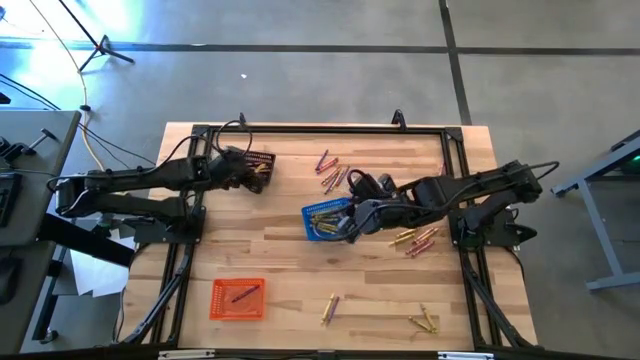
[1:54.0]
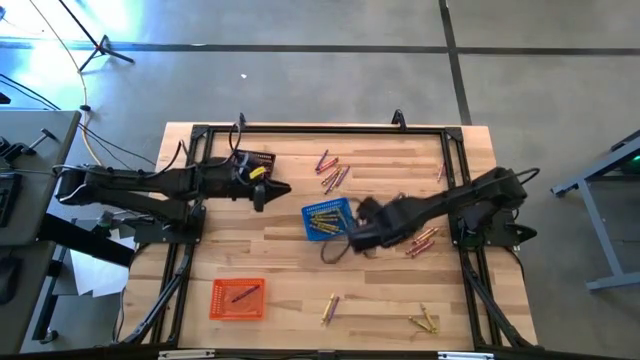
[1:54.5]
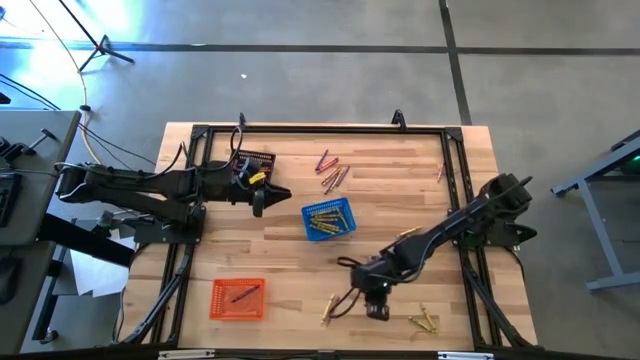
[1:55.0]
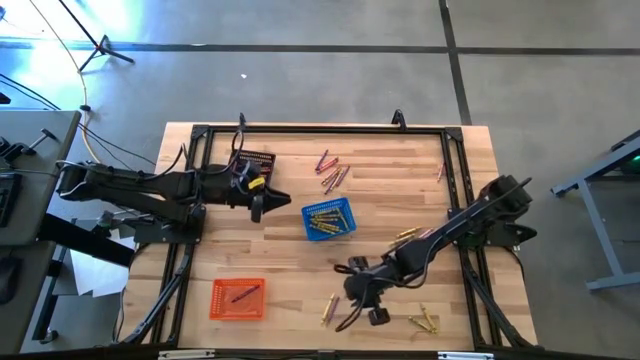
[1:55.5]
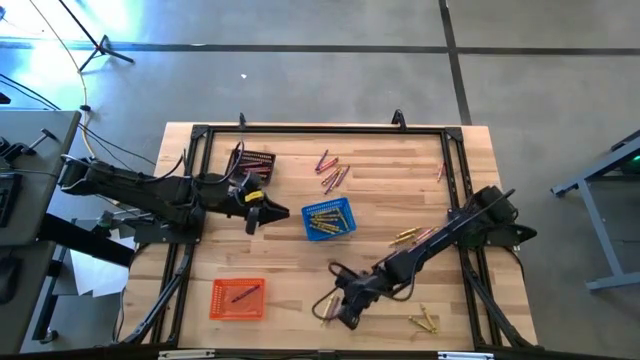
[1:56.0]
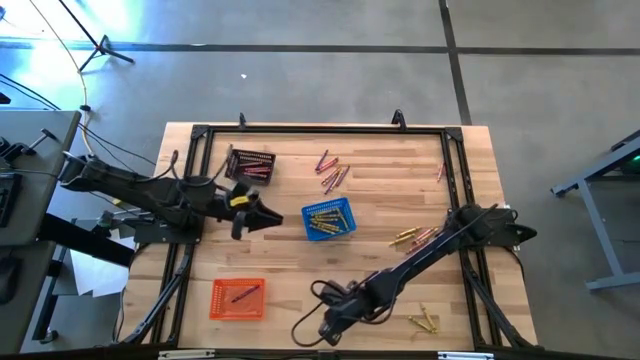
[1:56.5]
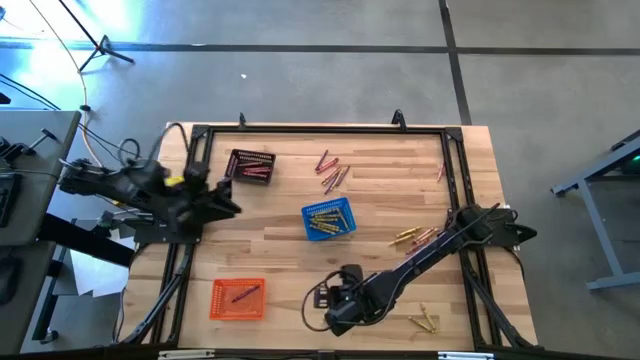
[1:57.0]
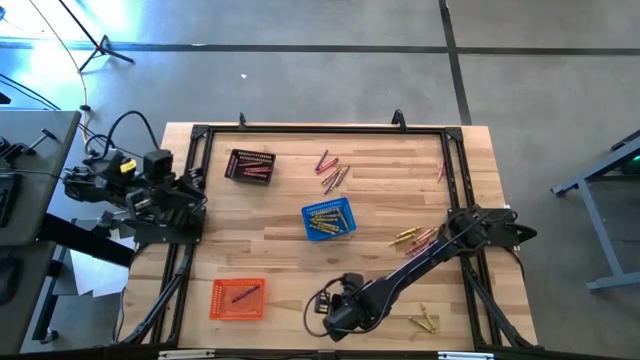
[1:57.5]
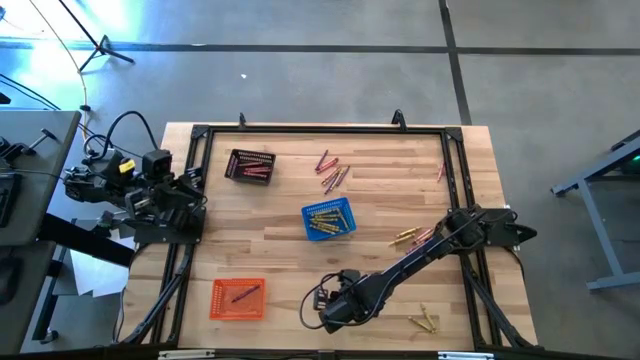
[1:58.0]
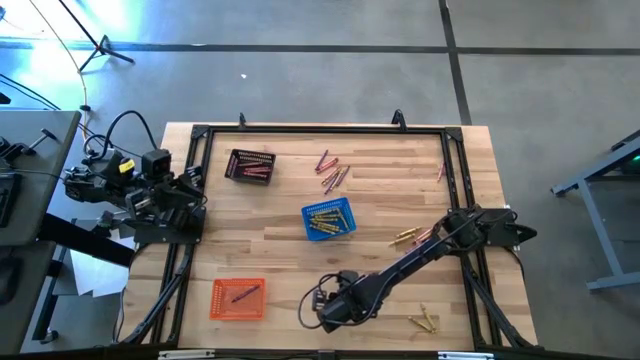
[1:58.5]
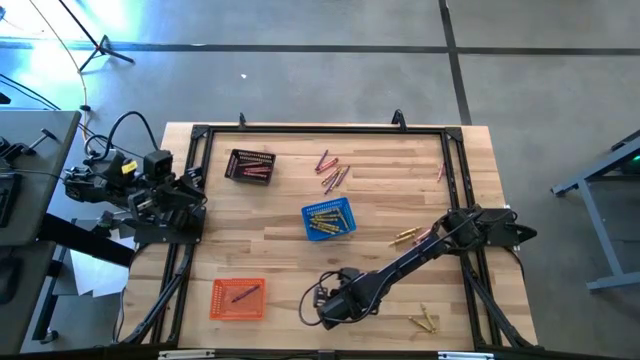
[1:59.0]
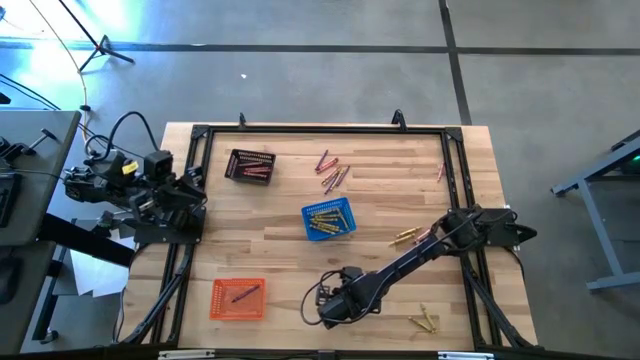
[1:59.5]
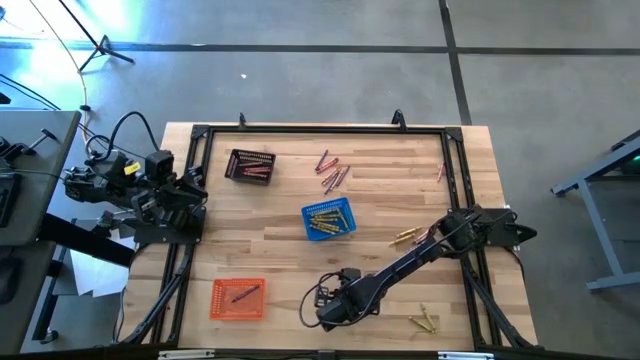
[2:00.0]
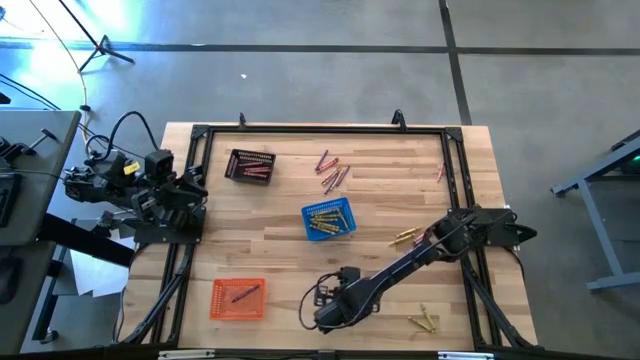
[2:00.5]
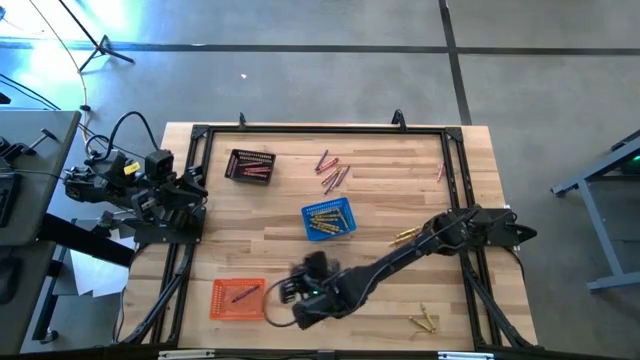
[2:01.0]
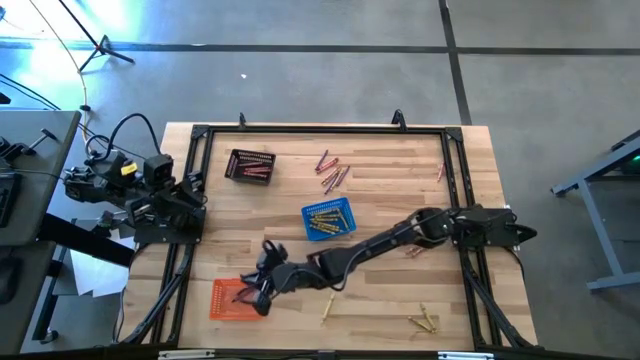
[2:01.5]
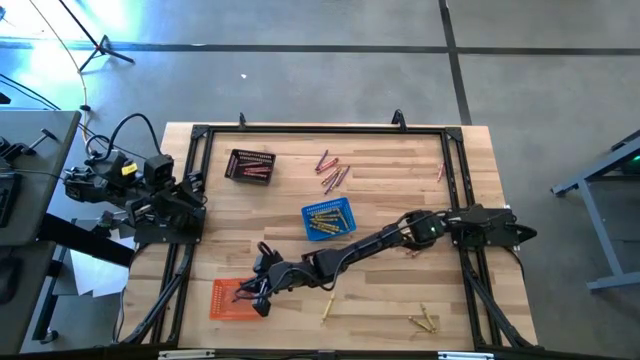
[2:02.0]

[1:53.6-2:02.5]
Task: Sort crayons
Put the violet crayon into the orange basket

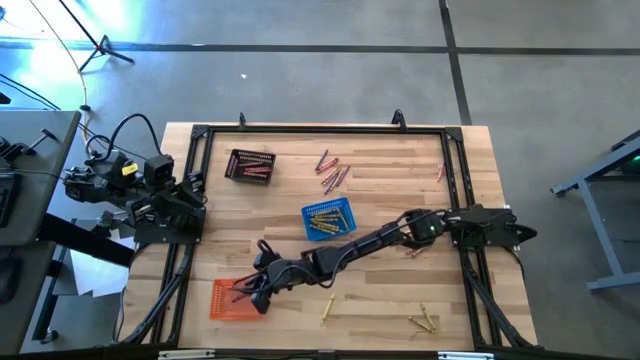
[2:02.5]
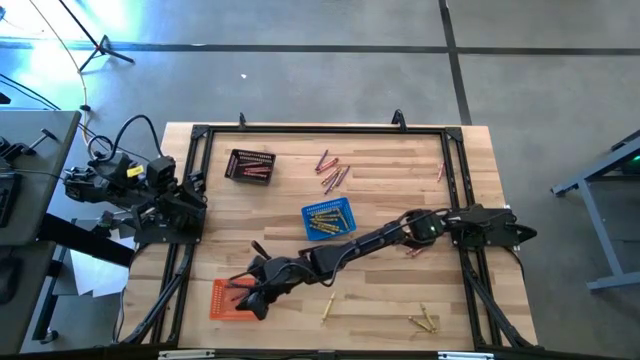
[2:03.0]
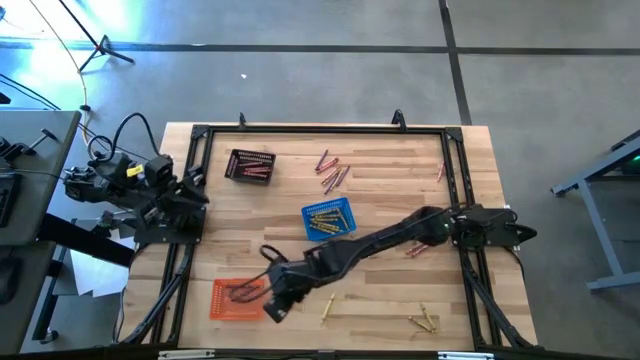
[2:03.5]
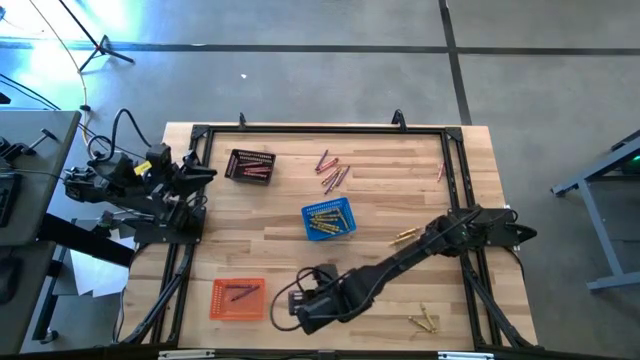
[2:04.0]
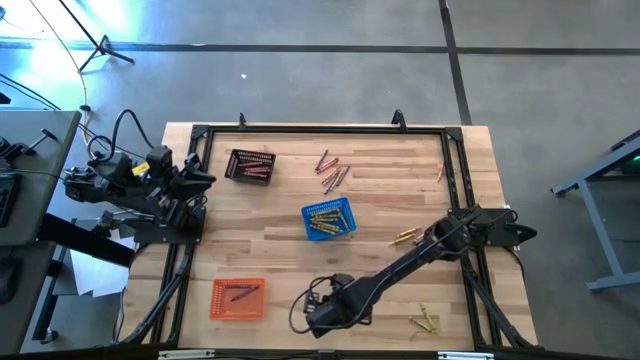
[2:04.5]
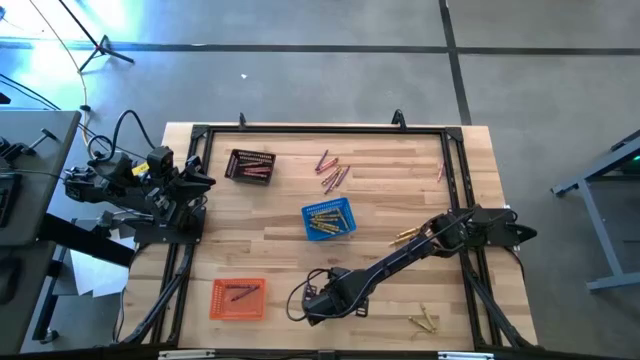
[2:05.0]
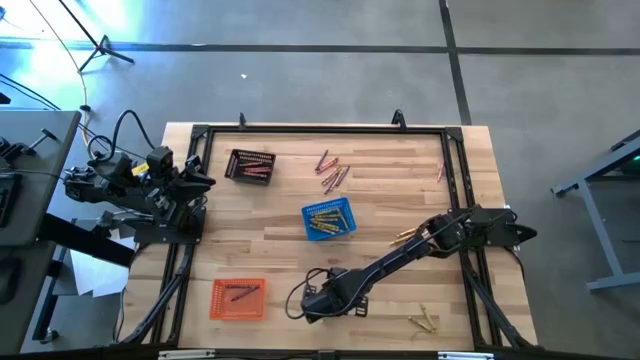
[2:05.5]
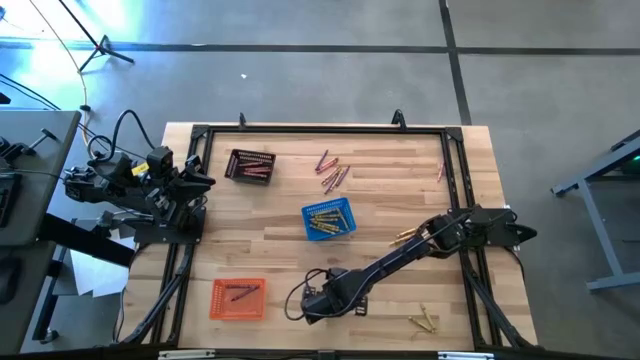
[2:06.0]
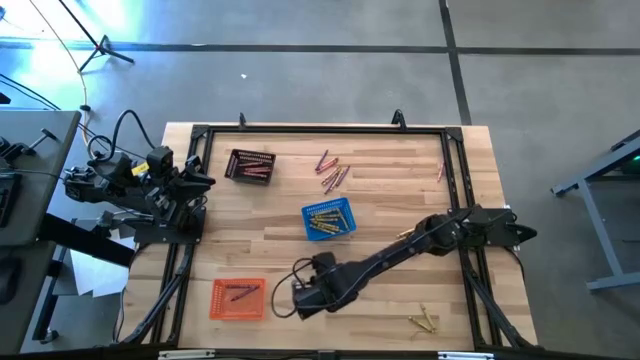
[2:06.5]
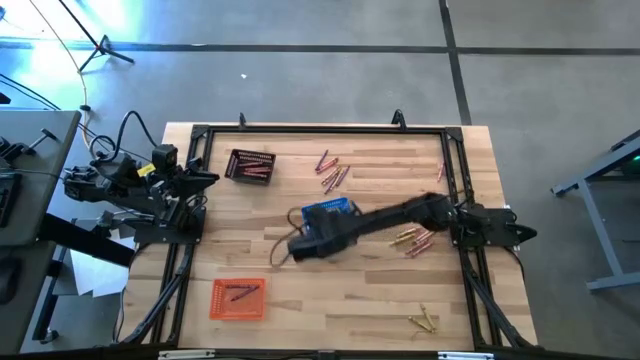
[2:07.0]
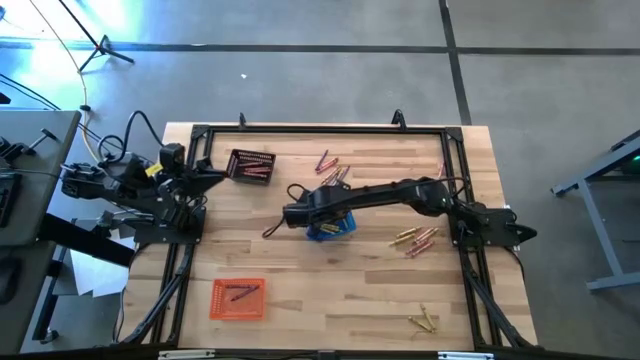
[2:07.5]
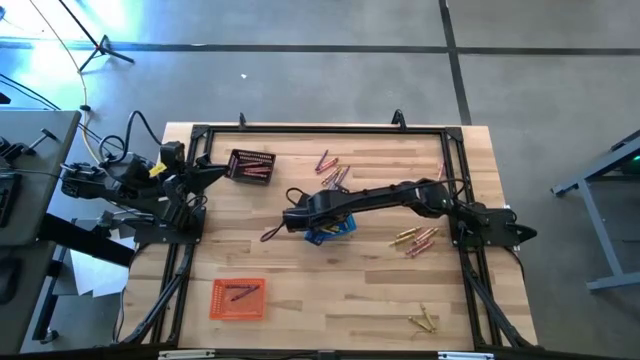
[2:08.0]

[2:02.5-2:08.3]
Put the yellow crayon into the blue basket

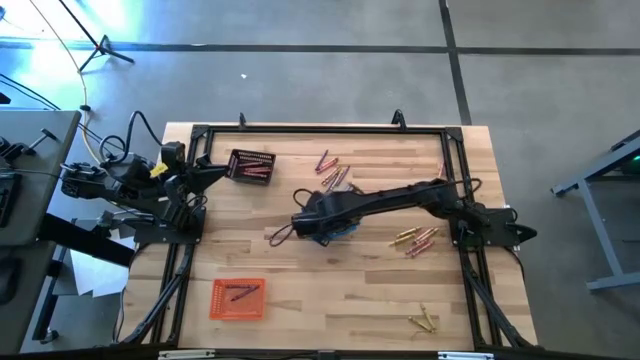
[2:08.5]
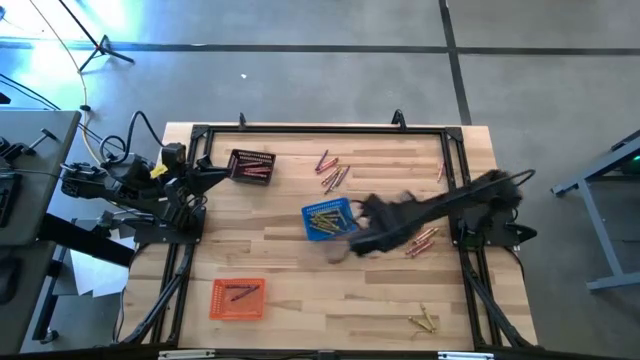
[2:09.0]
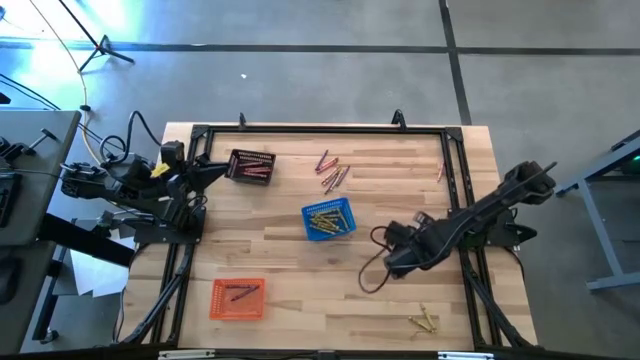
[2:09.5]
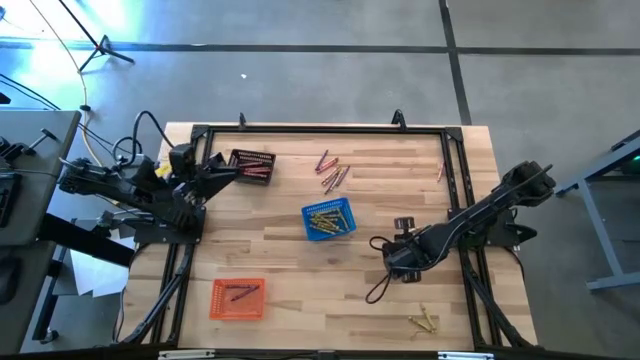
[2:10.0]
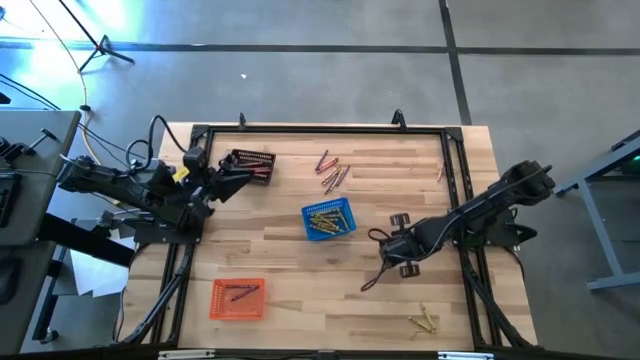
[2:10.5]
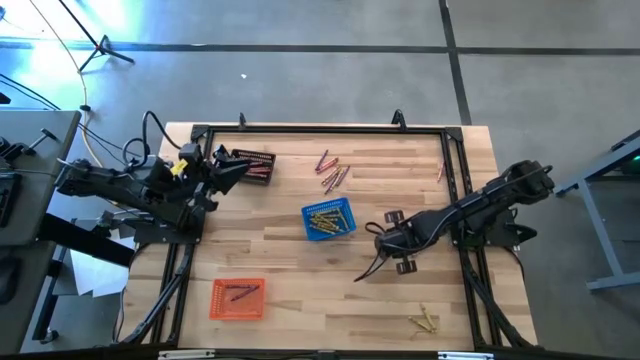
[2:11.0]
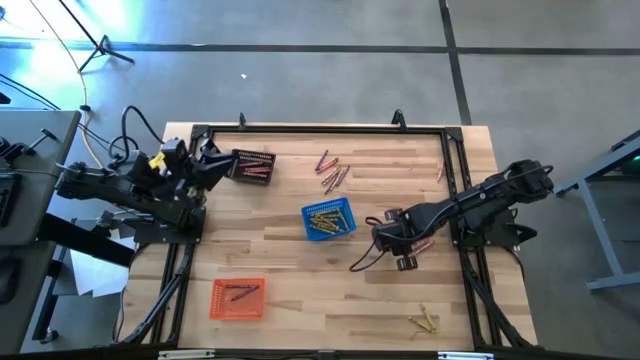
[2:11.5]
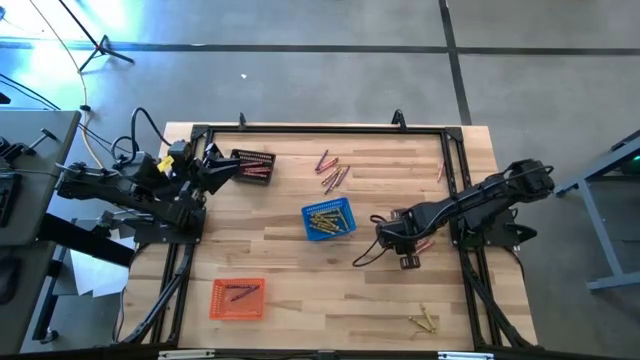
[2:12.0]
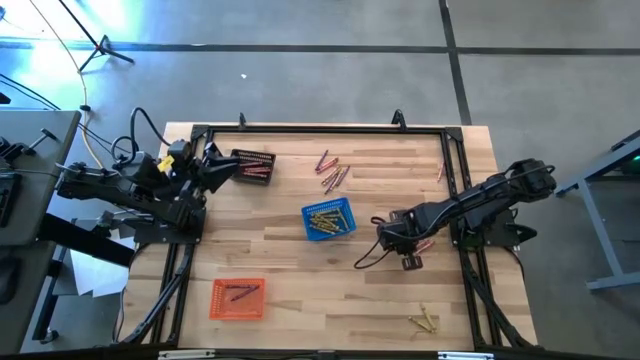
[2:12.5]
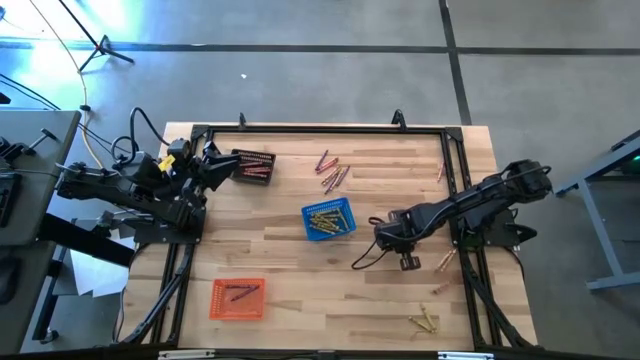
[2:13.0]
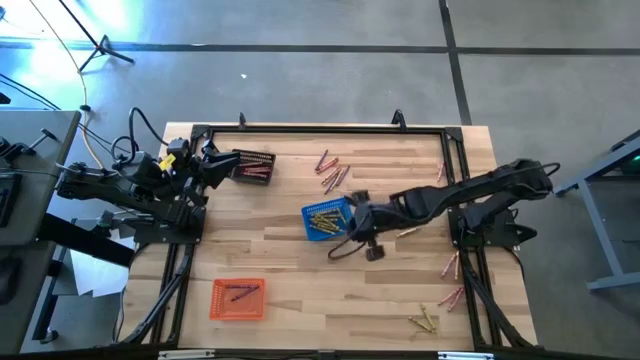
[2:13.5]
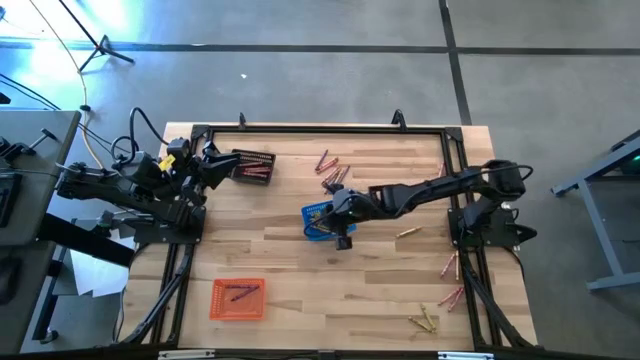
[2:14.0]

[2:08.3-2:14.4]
Put the yellow crayon into the blue basket

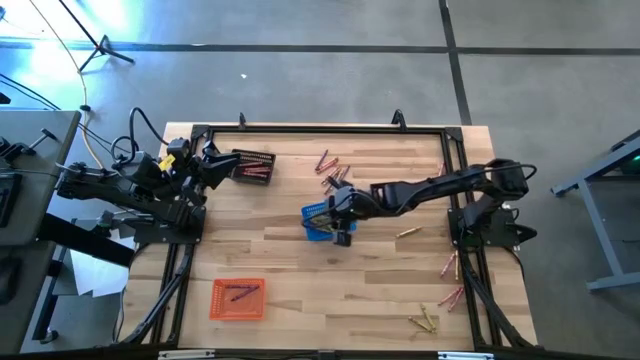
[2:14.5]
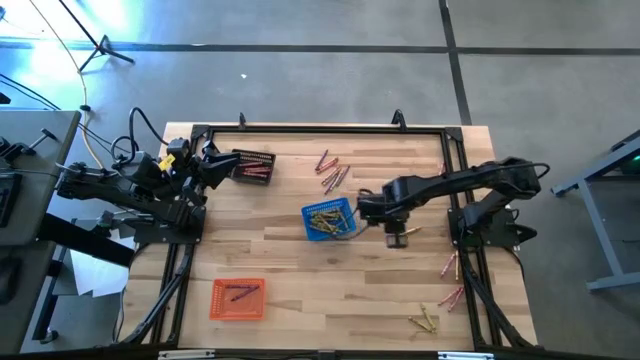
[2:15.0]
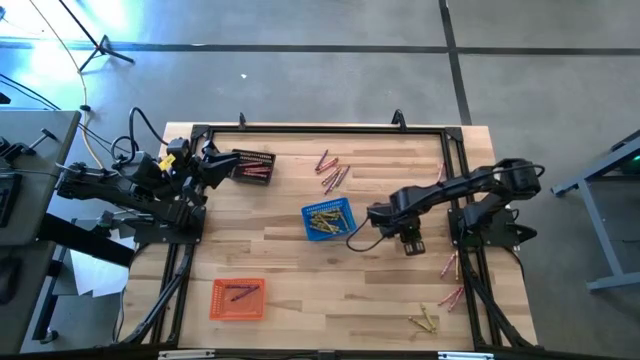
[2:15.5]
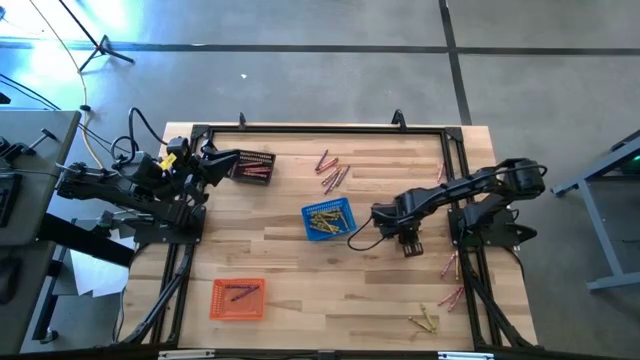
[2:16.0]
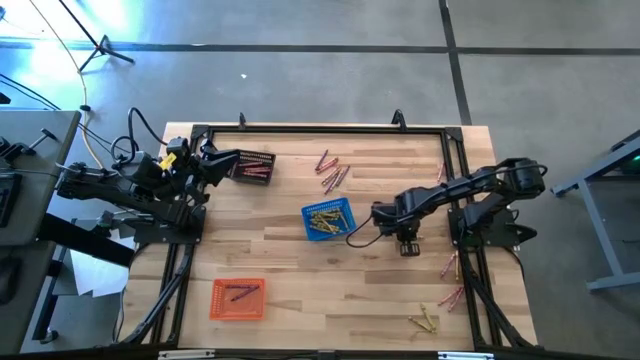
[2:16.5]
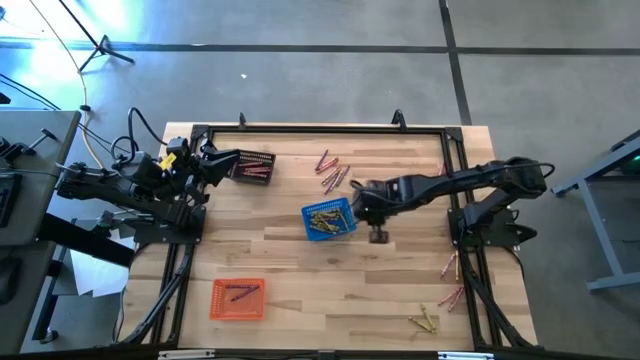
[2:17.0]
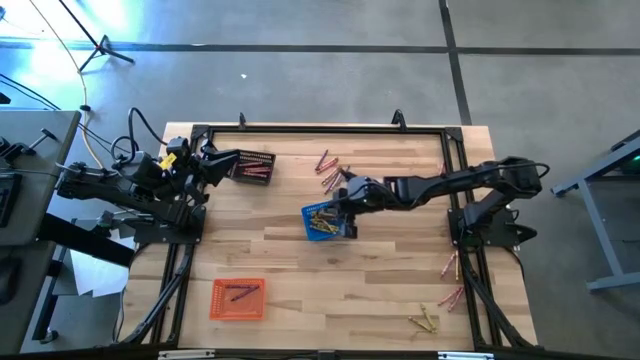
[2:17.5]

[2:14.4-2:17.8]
Put the yellow crayon into the blue basket
